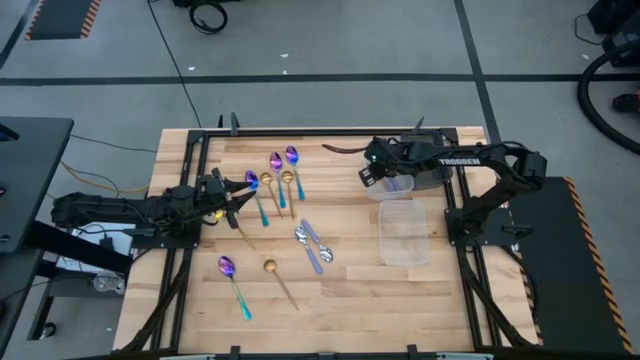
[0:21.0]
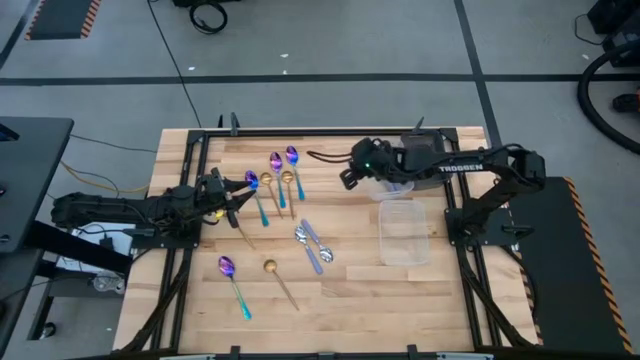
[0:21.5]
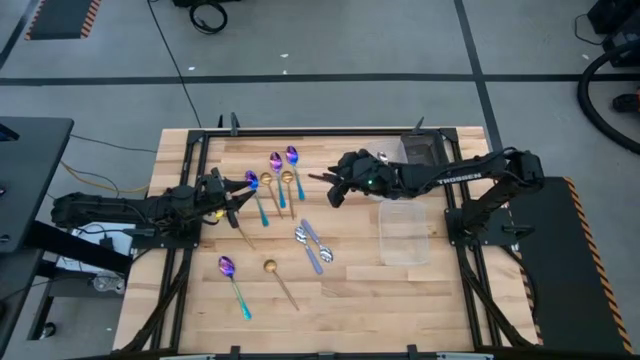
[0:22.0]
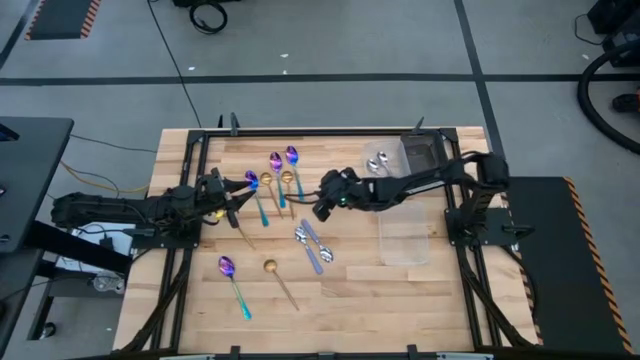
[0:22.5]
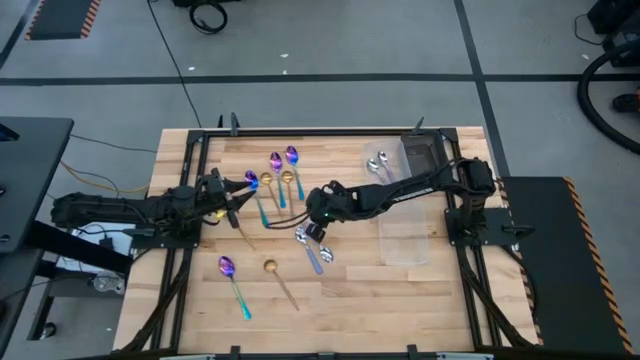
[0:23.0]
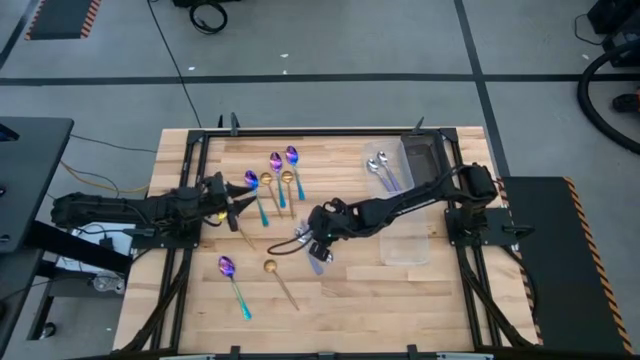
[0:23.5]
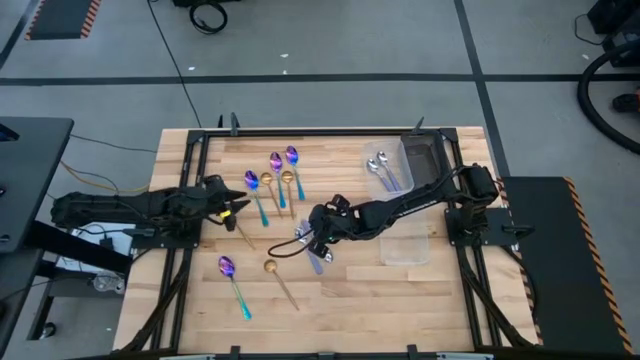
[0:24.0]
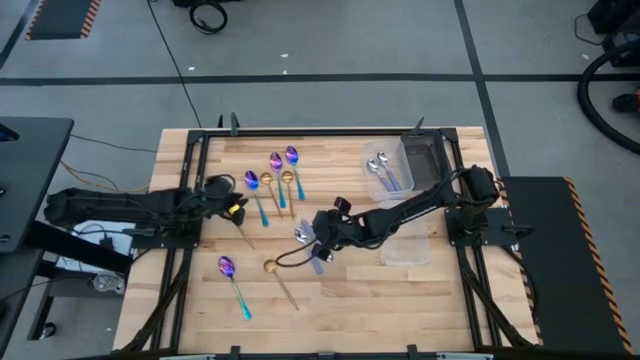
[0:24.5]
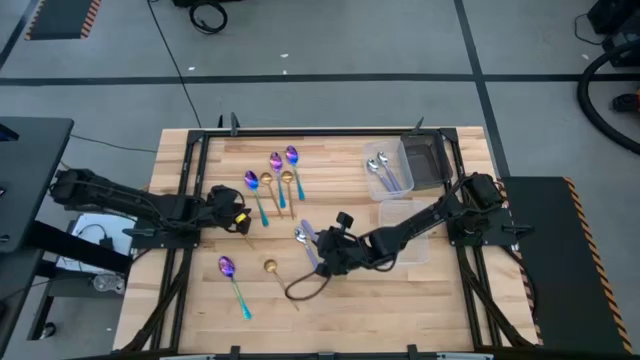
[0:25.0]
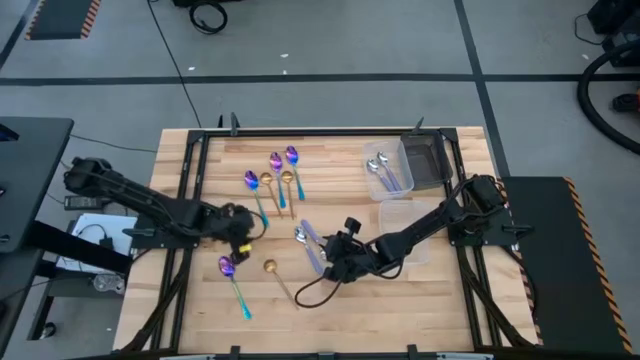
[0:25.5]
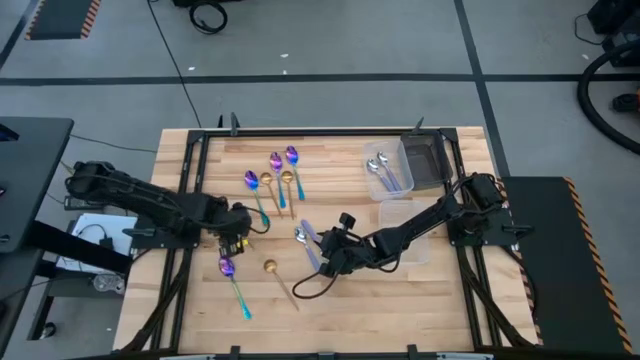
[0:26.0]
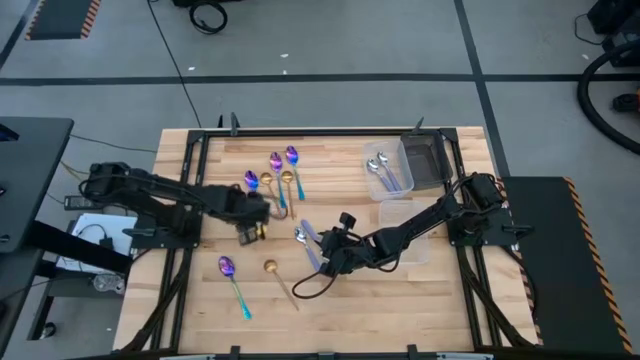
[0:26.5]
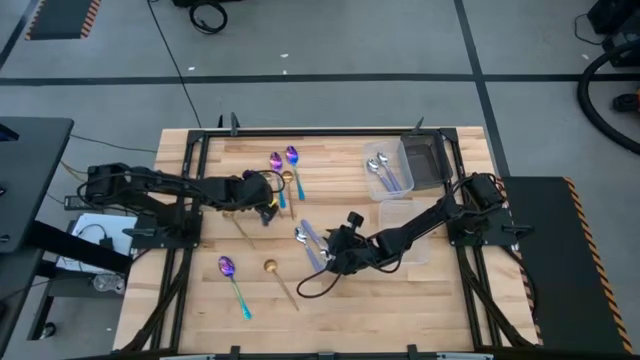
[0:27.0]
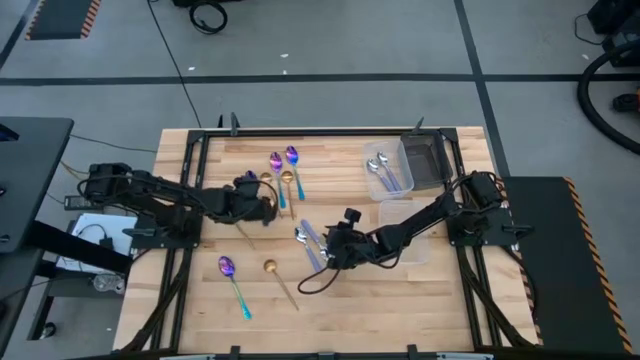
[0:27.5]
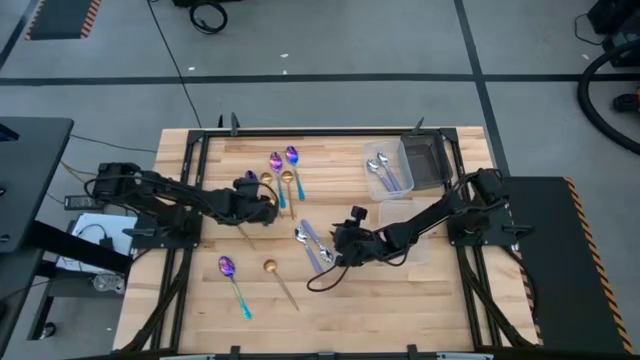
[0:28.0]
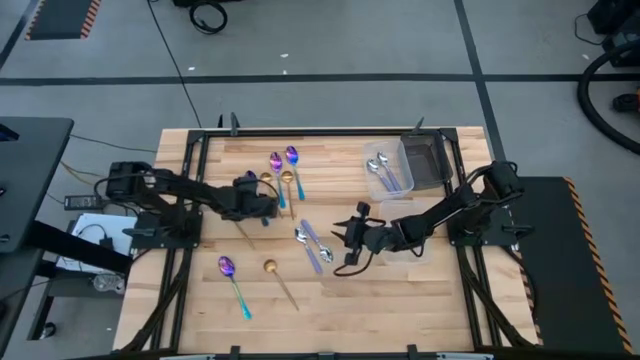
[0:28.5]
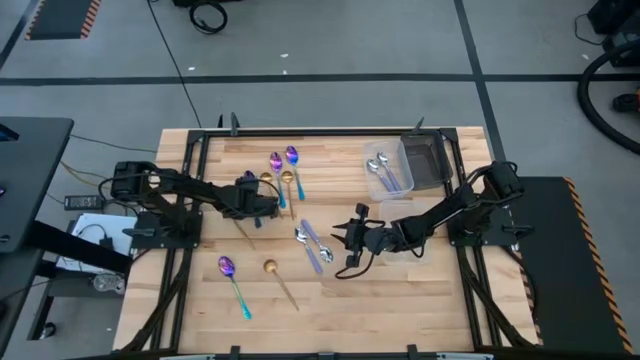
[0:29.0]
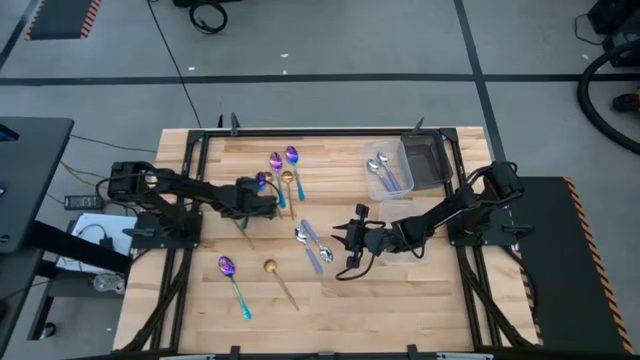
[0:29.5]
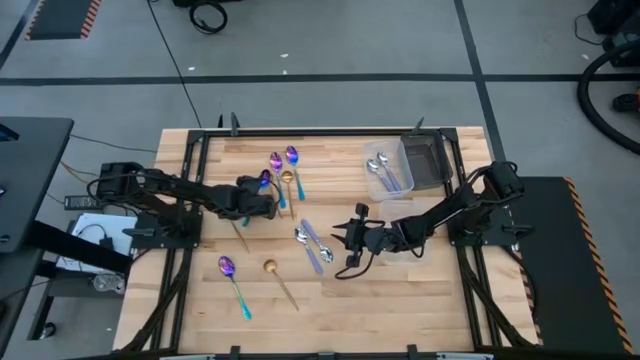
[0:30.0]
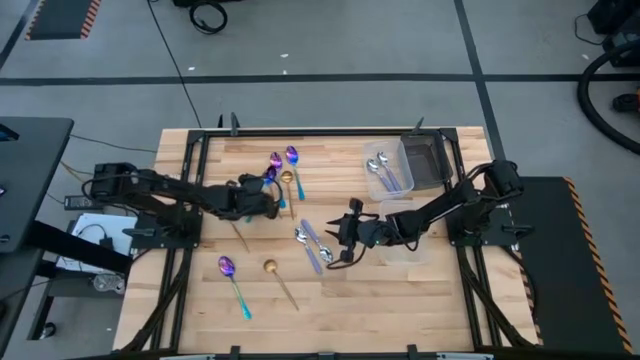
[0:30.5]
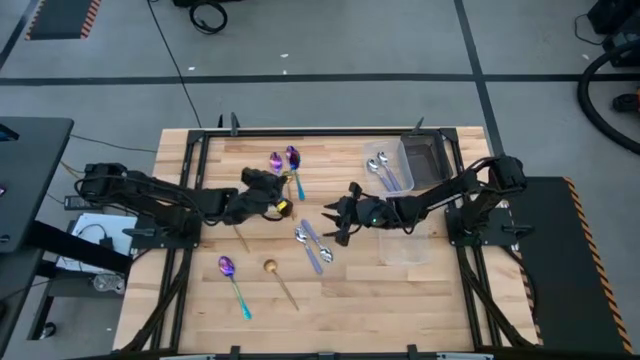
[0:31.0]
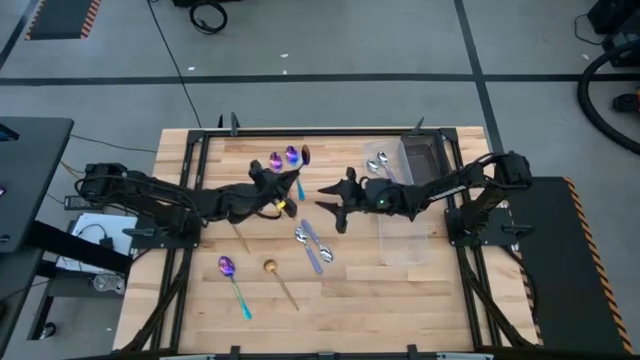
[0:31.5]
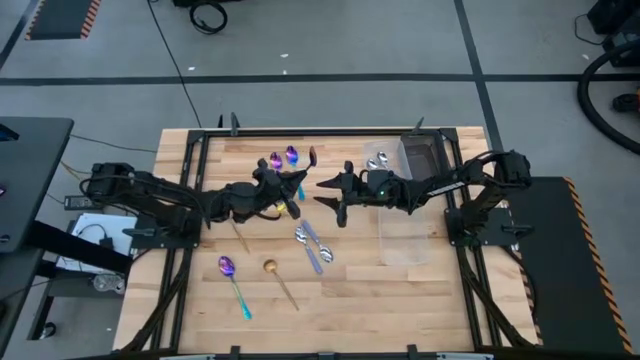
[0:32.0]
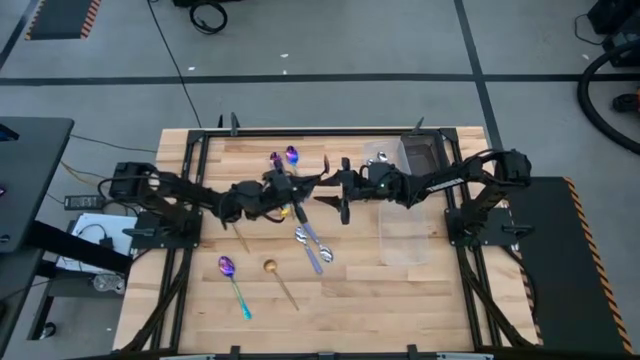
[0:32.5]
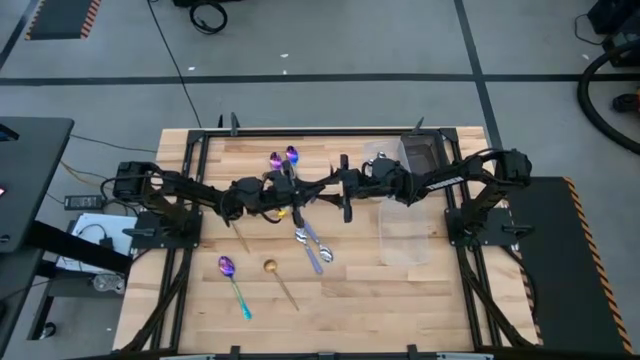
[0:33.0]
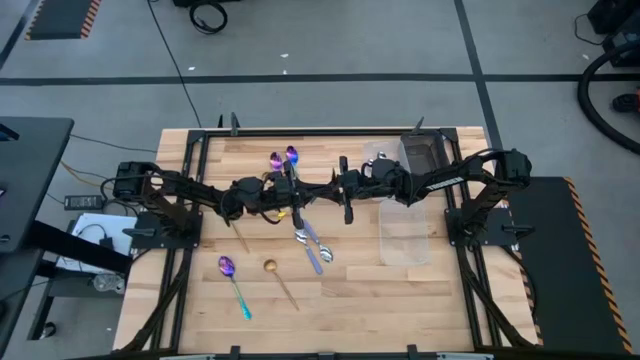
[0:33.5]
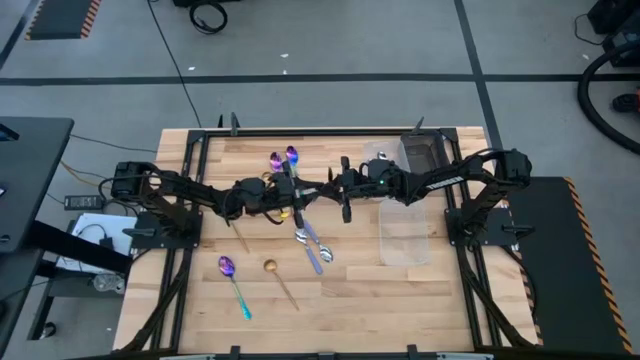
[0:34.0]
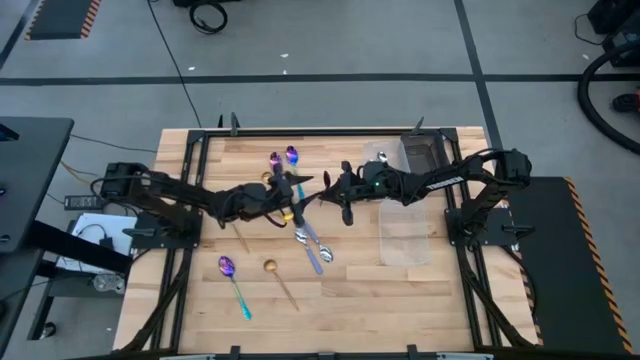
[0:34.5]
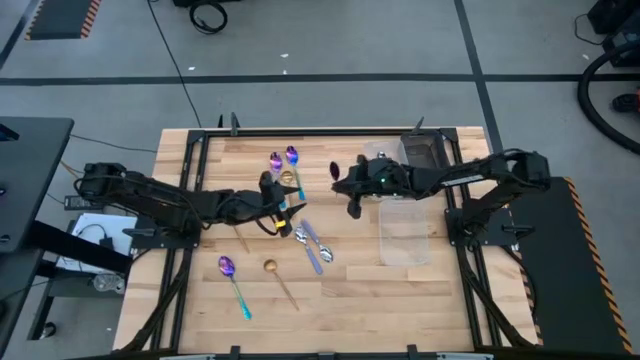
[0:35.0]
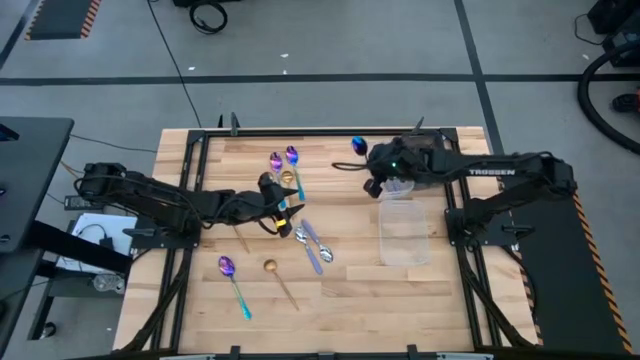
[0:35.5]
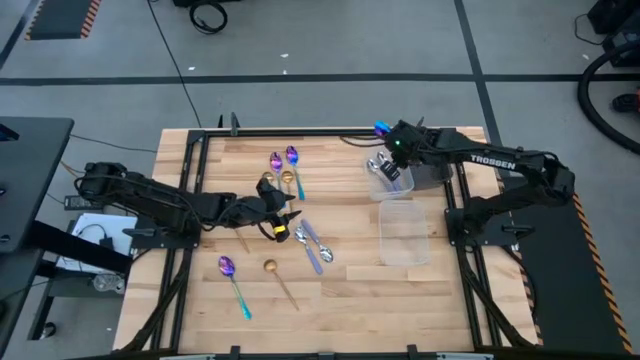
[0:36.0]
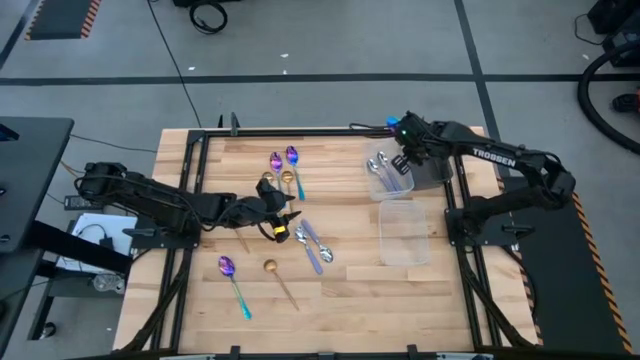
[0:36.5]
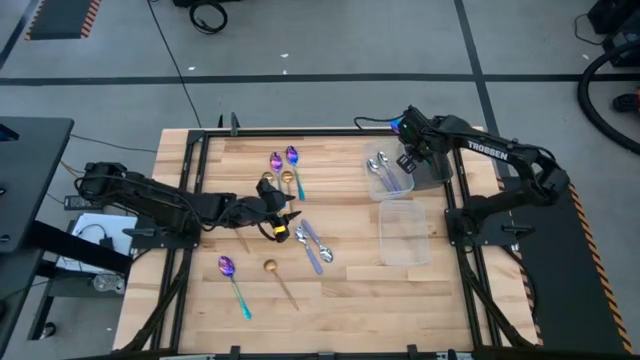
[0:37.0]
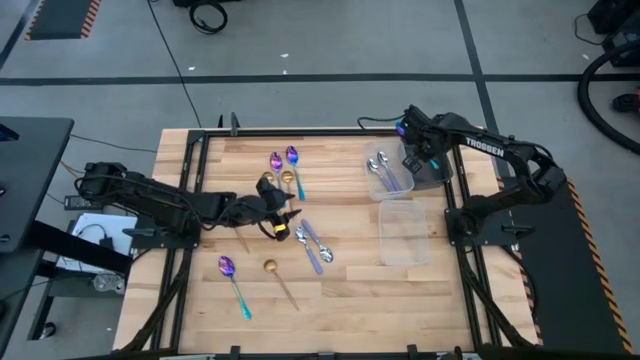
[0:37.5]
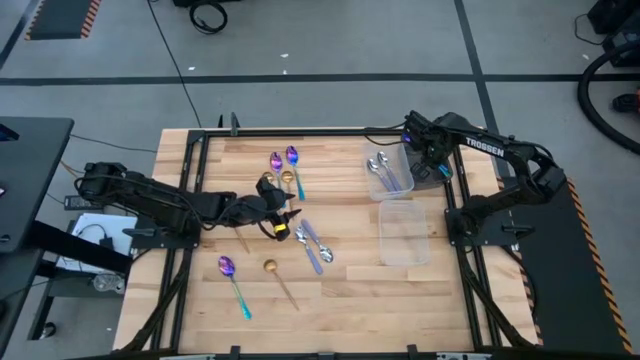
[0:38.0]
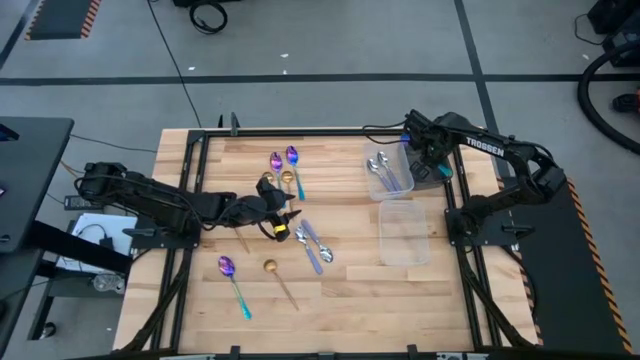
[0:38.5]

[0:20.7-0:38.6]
Task: Sort silverware by color (type)
Put the blue spoon into the black bin

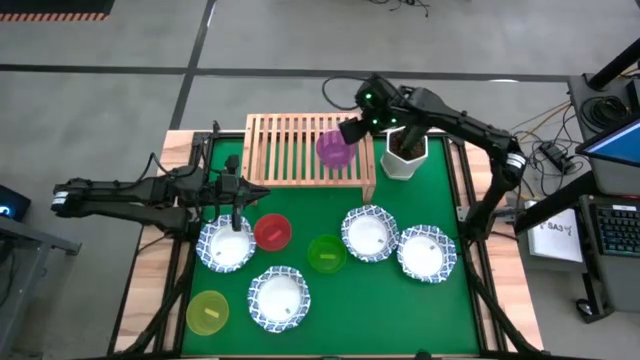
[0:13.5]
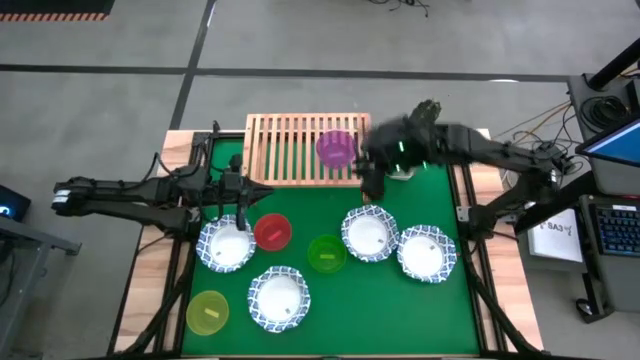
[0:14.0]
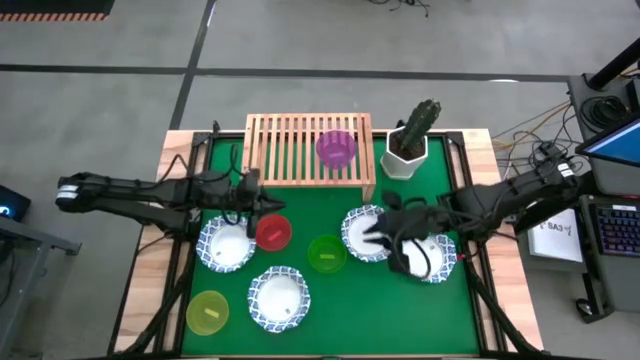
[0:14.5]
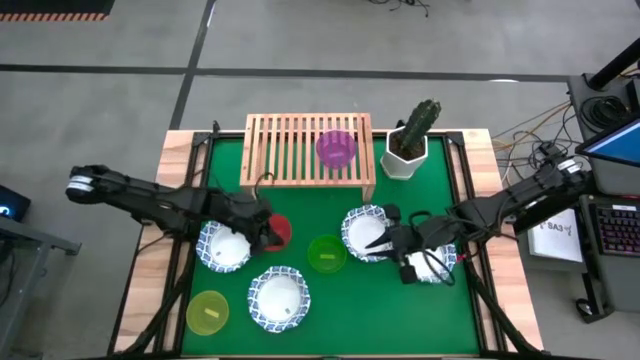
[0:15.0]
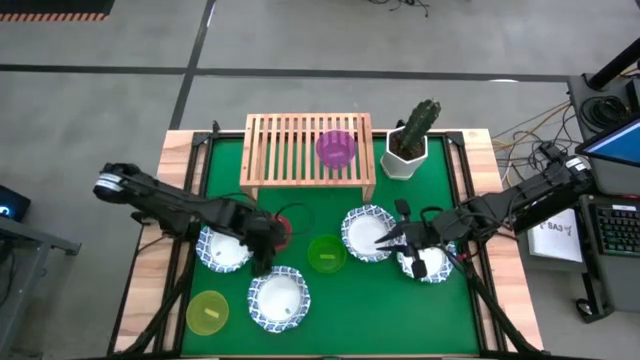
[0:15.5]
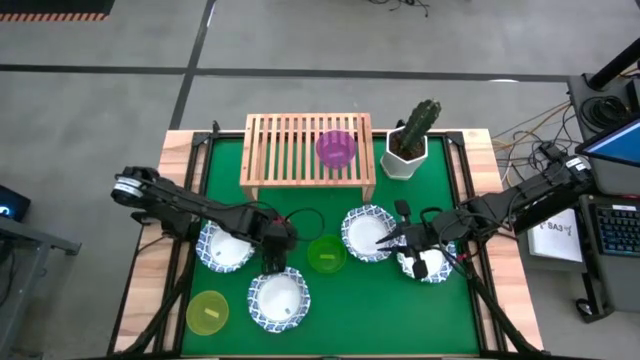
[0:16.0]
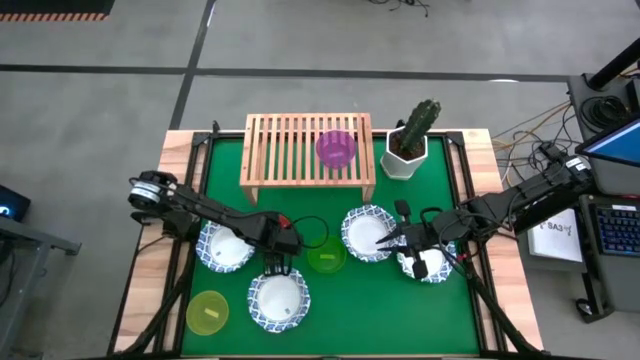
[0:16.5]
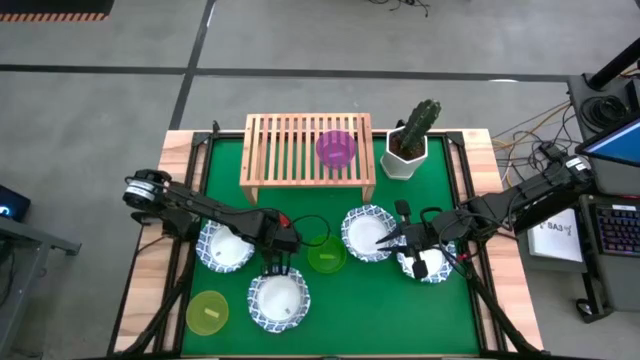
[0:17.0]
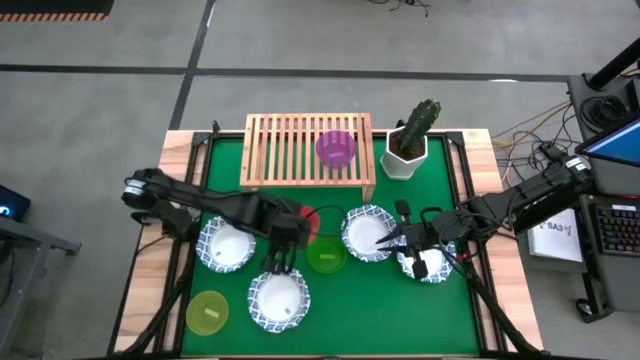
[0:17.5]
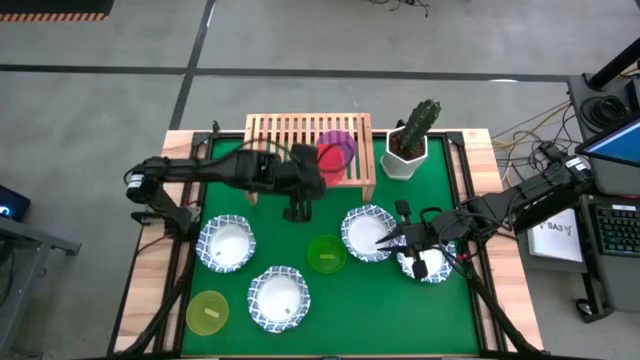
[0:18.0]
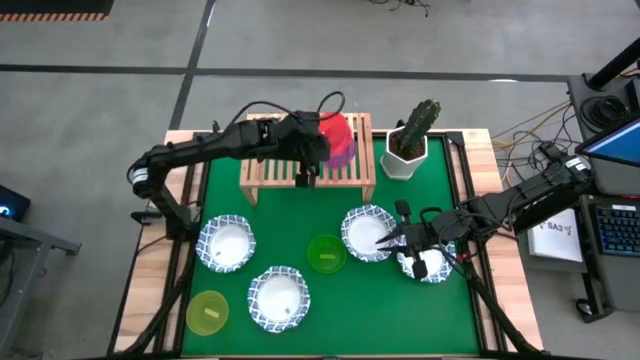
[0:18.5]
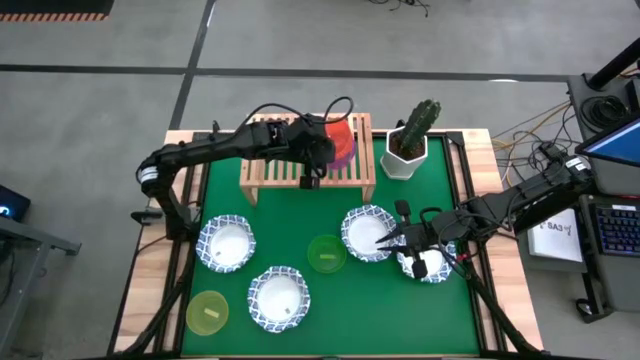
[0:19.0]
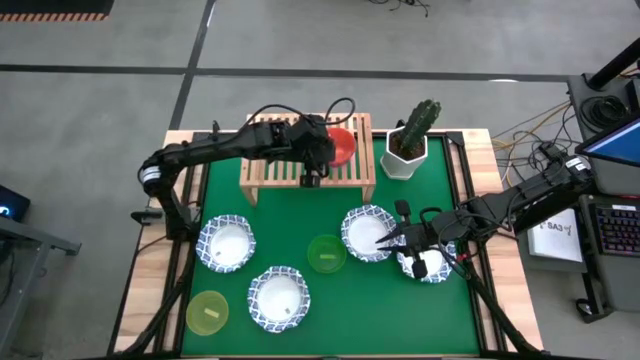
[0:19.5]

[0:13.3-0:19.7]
Task: Place and stack bowls onto a shelf
Stack the small orange bowl on top of the small purple bowl on the shelf
